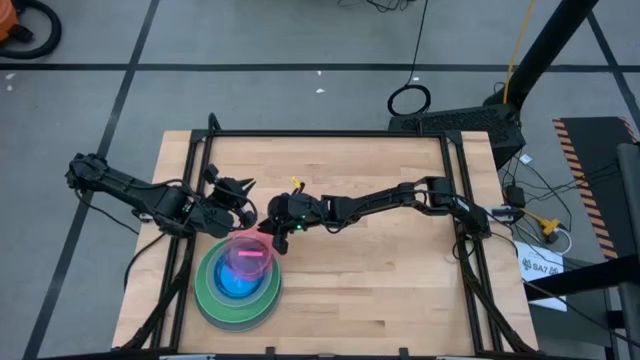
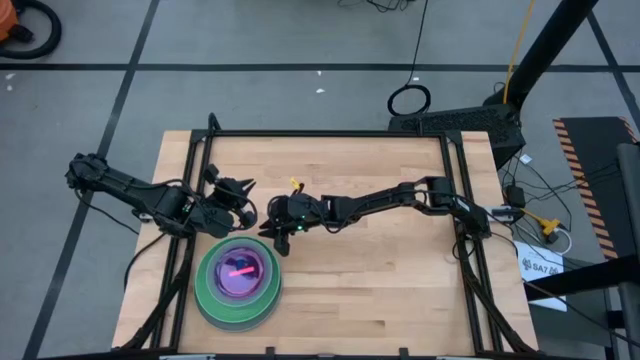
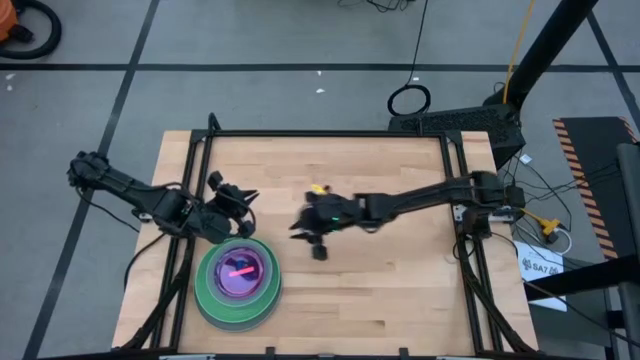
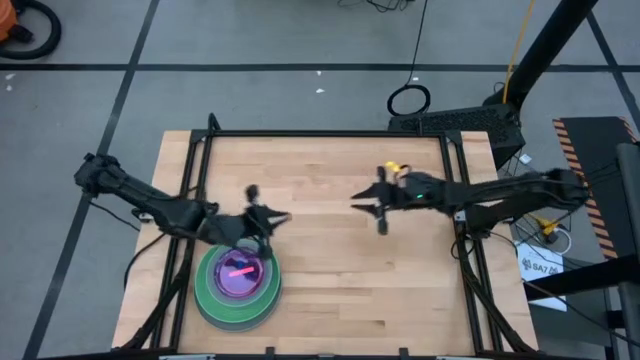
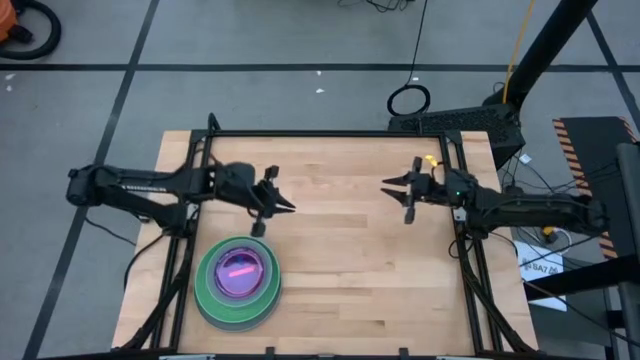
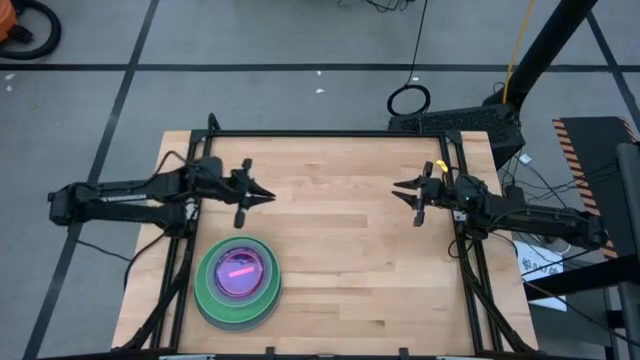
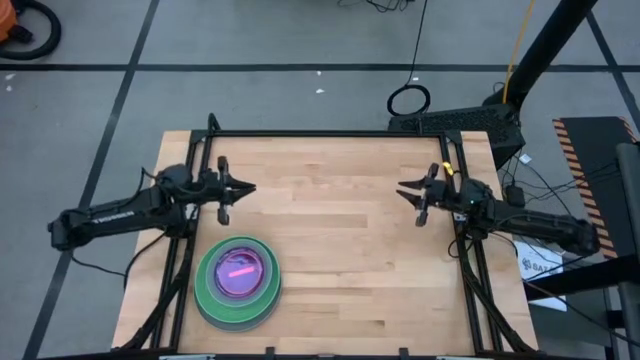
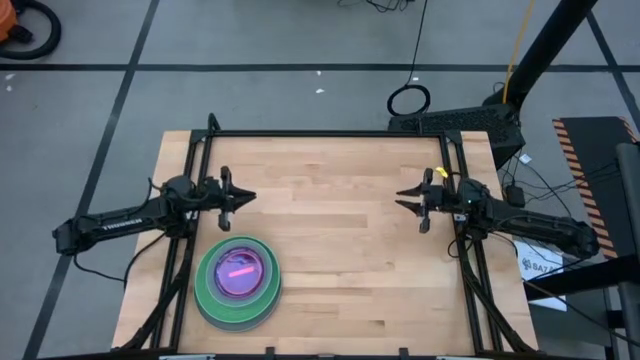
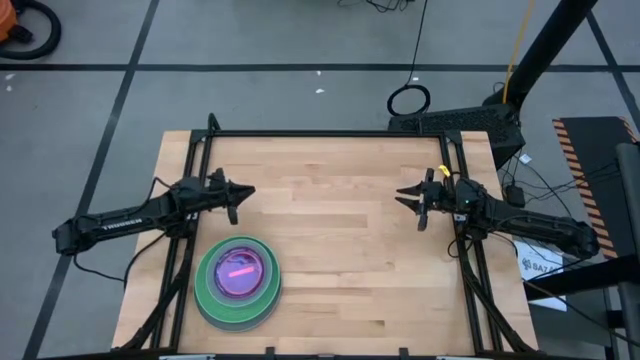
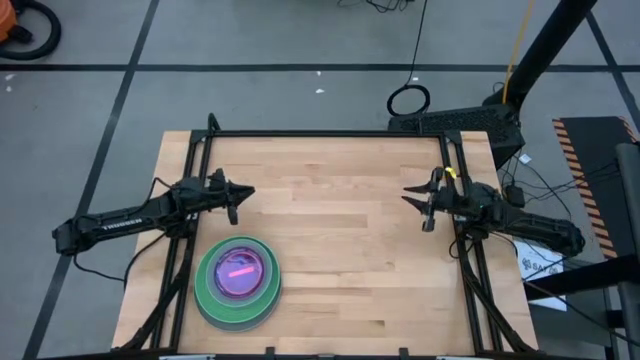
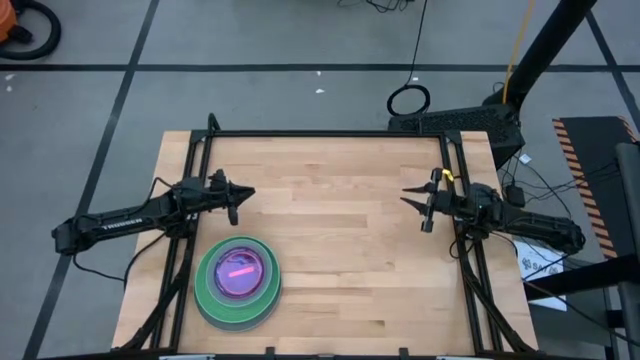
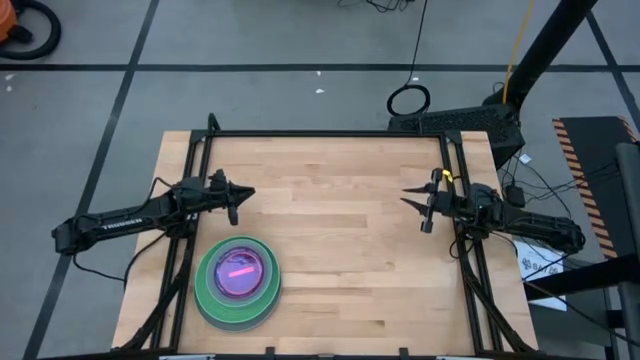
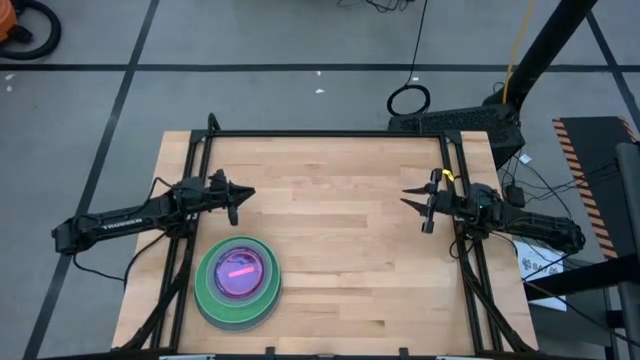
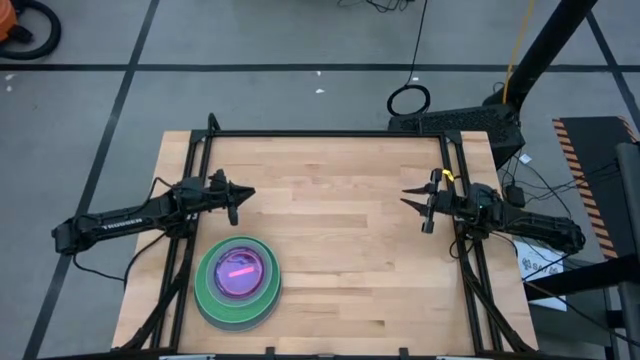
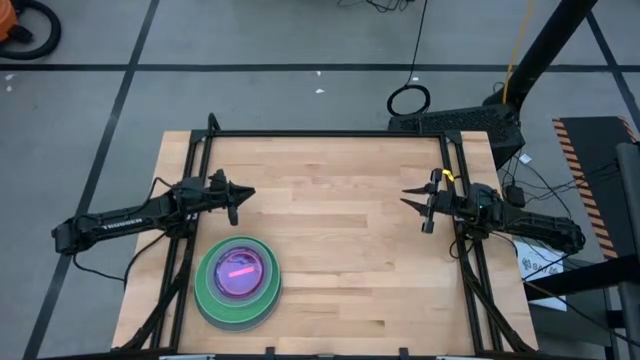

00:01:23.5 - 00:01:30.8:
Task: Stack plastic plates
Return to Home Position

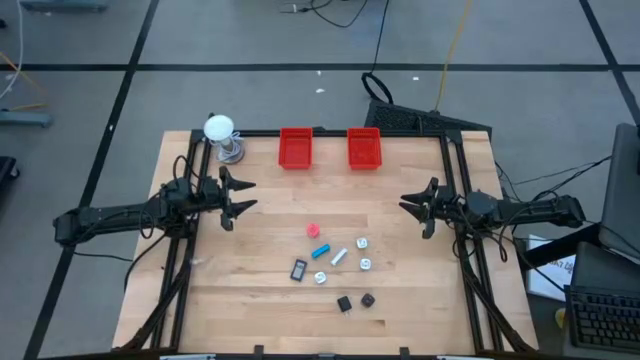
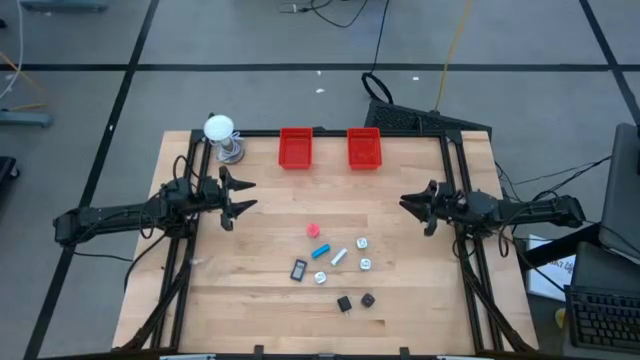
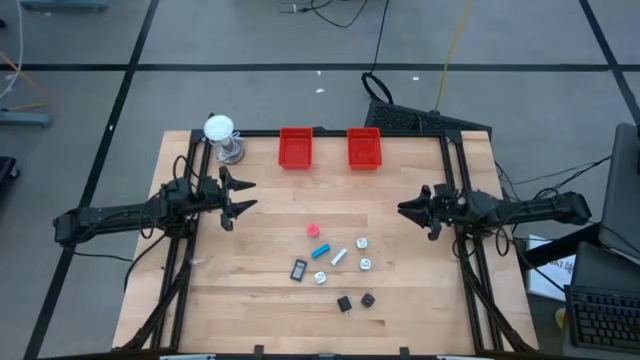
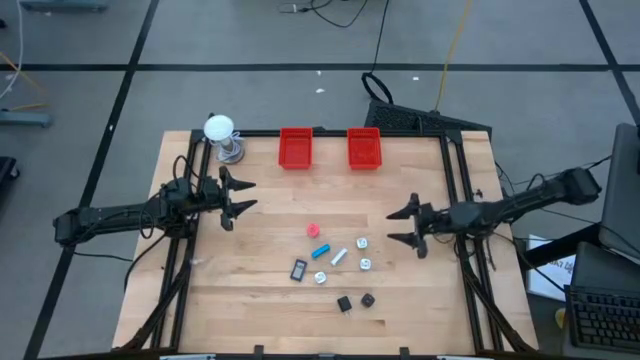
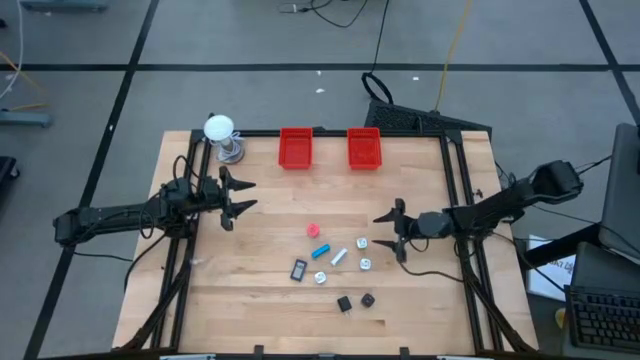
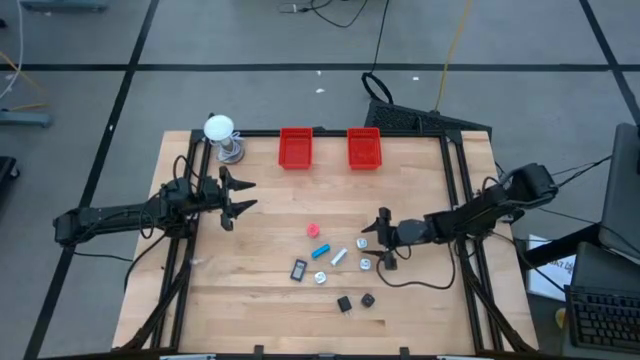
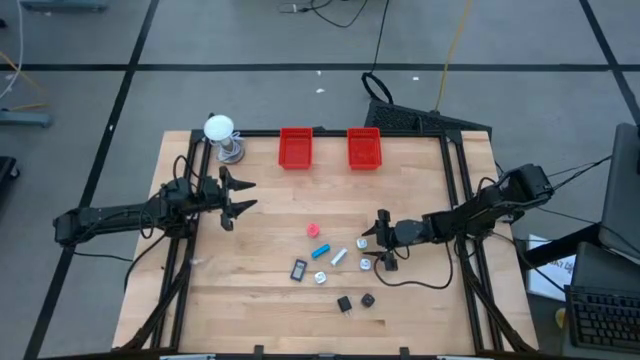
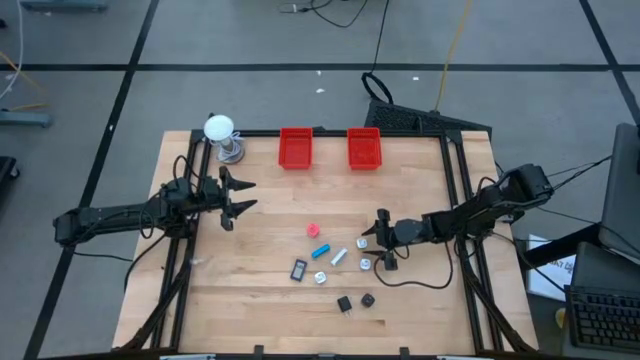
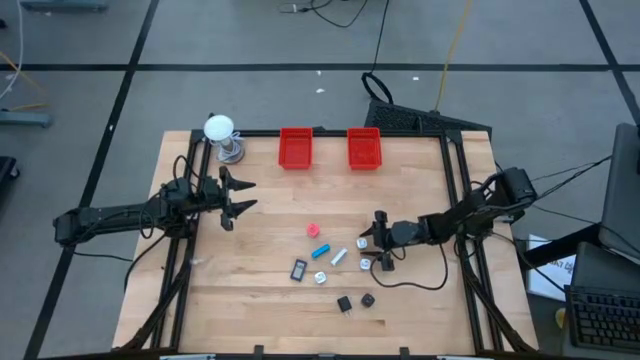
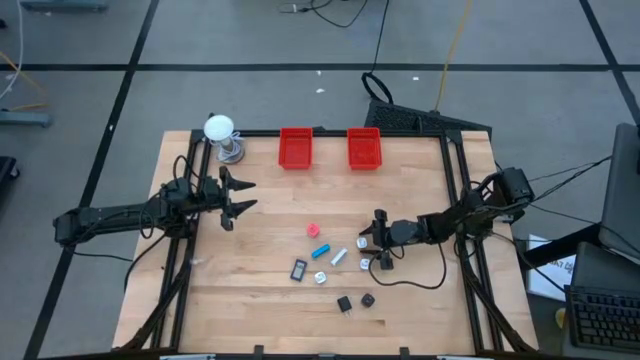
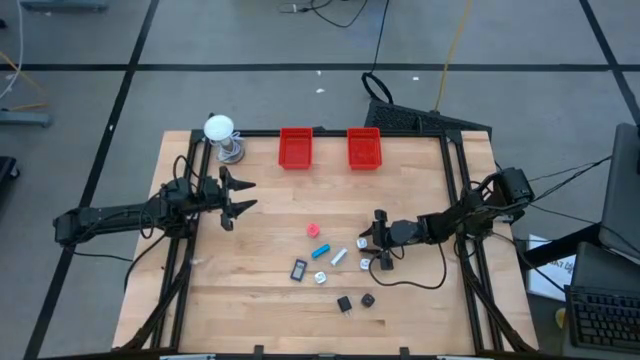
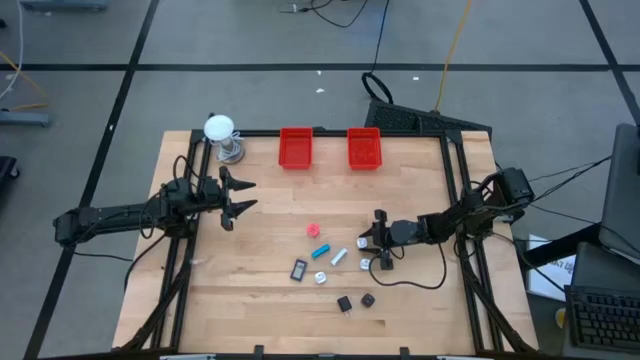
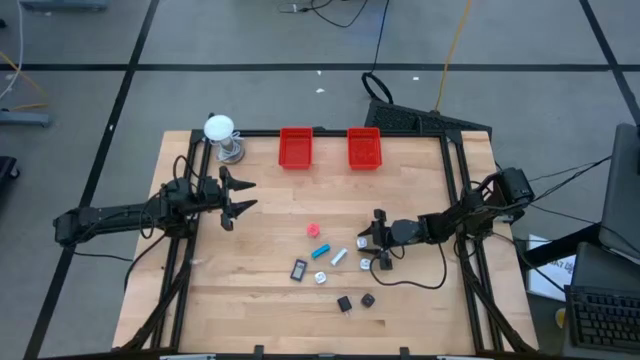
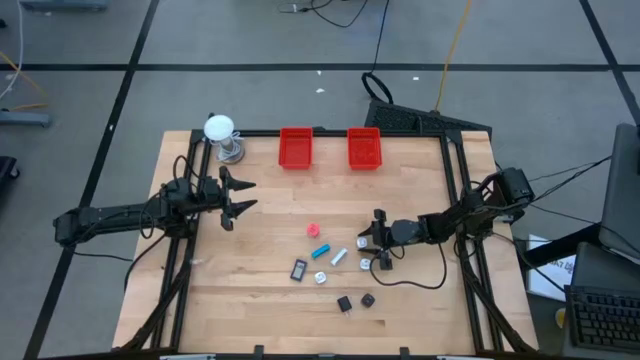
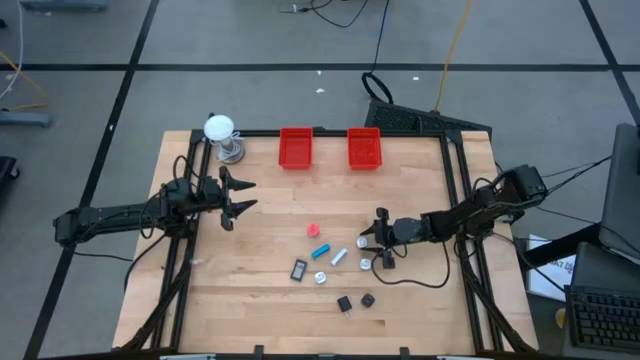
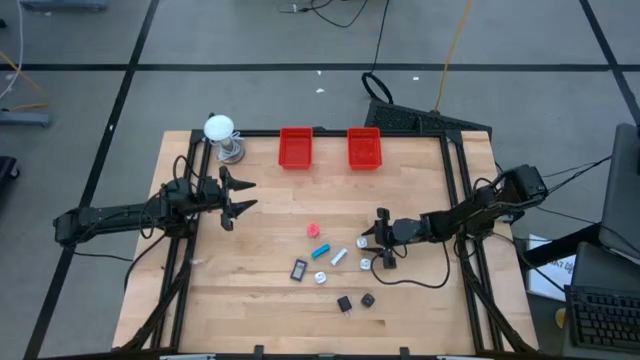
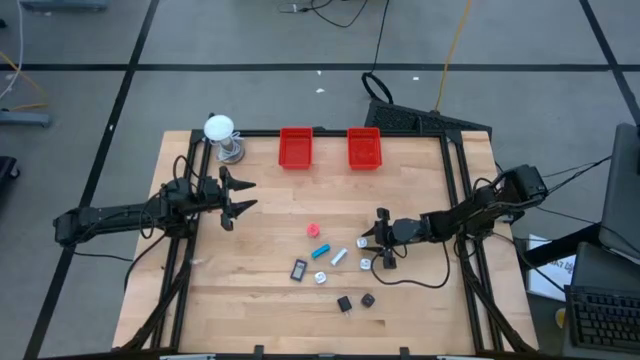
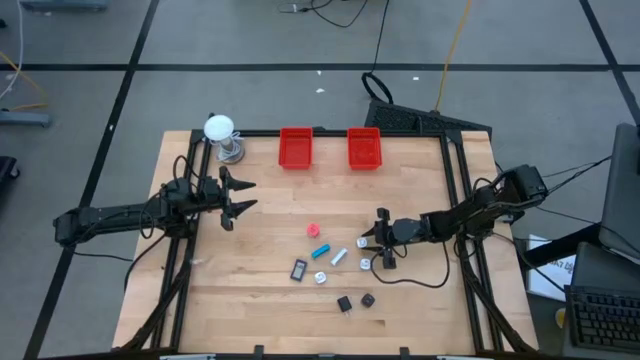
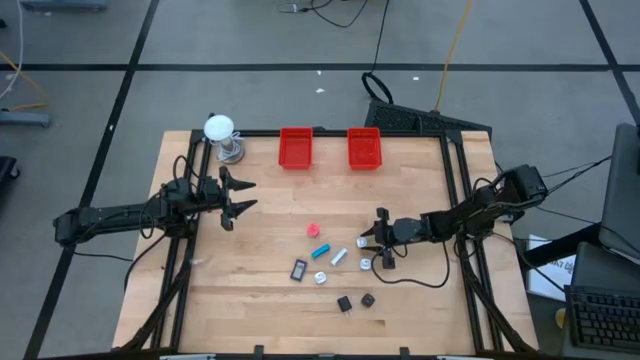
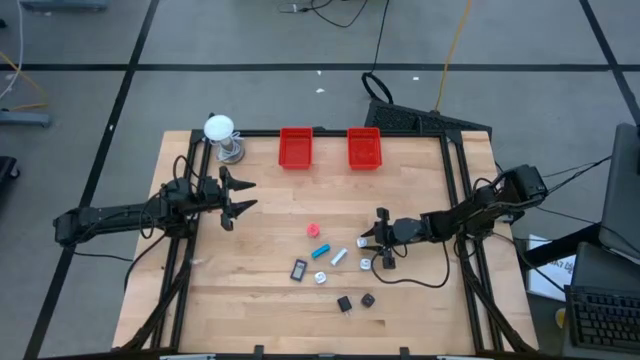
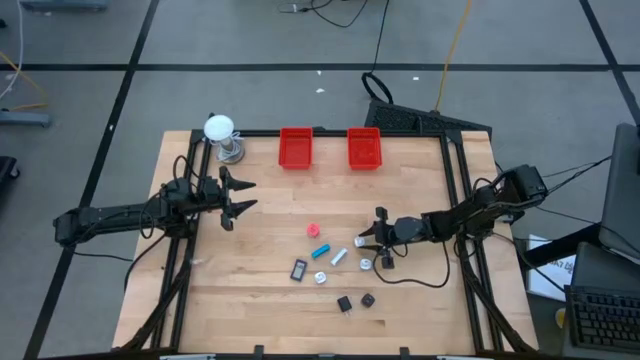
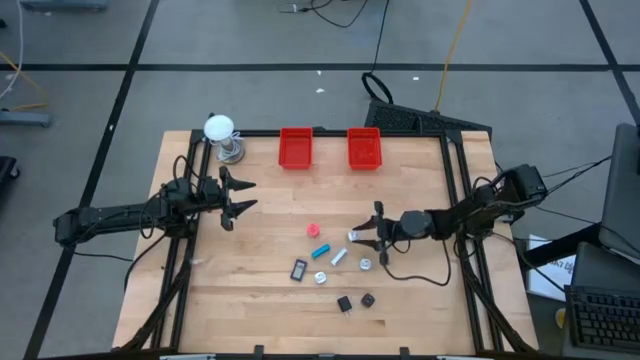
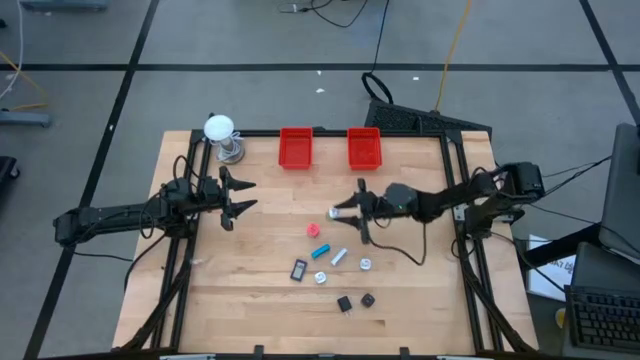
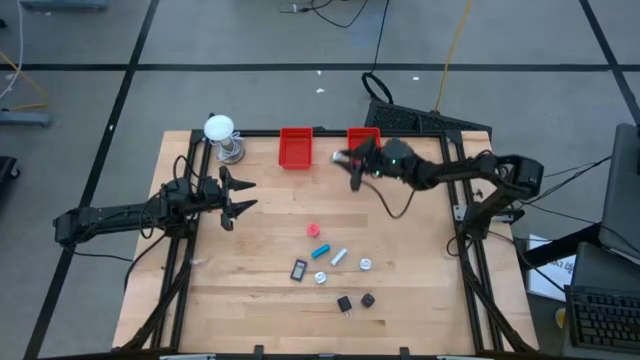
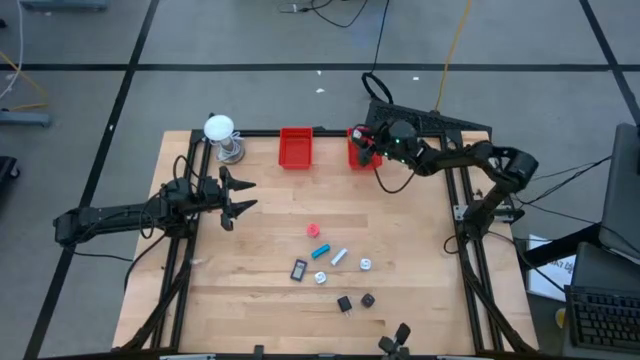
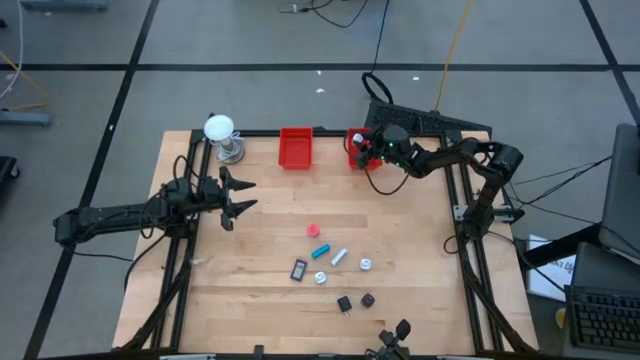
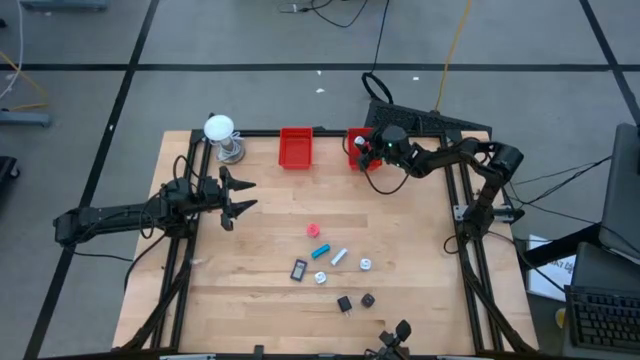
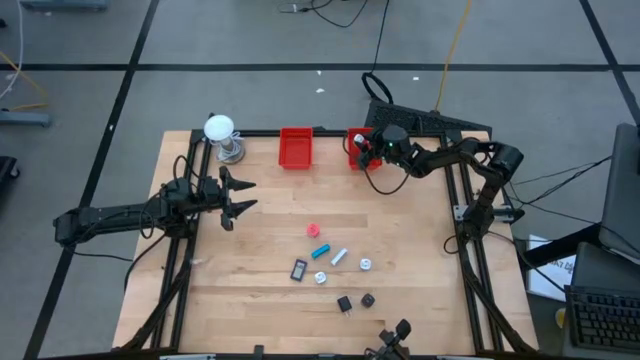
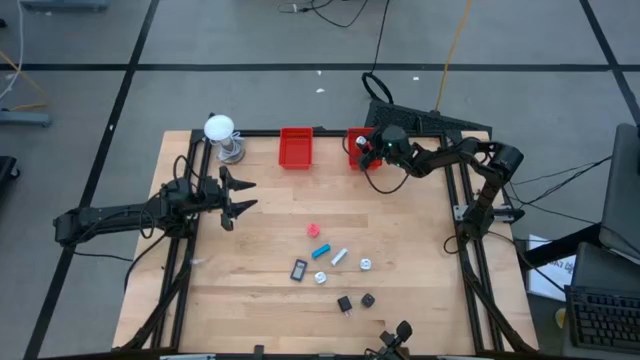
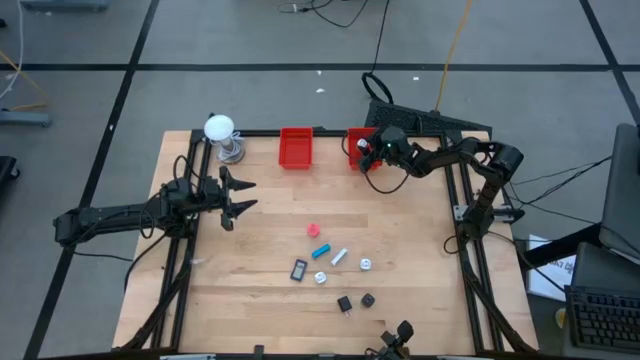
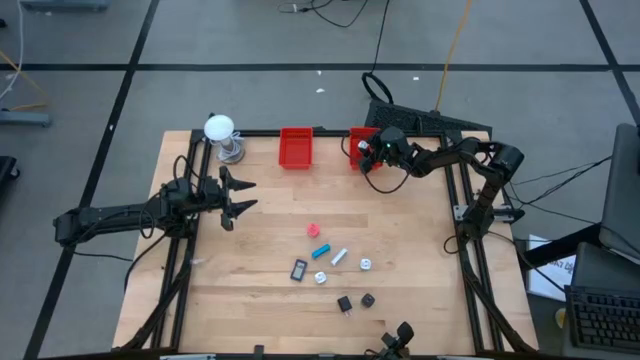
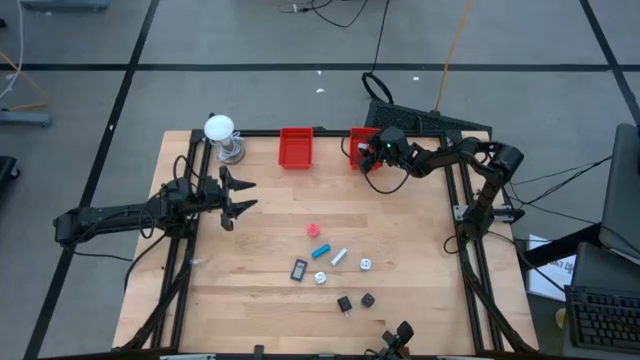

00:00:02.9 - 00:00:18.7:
Task: Pick & Place Office items
Put the green charger adapter into the right red basket
